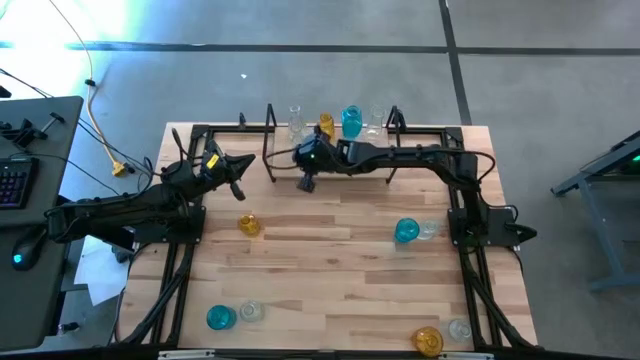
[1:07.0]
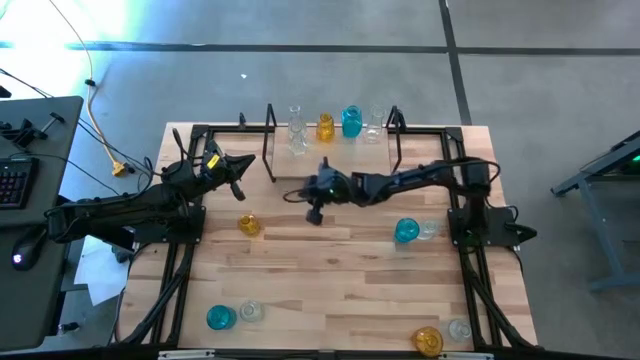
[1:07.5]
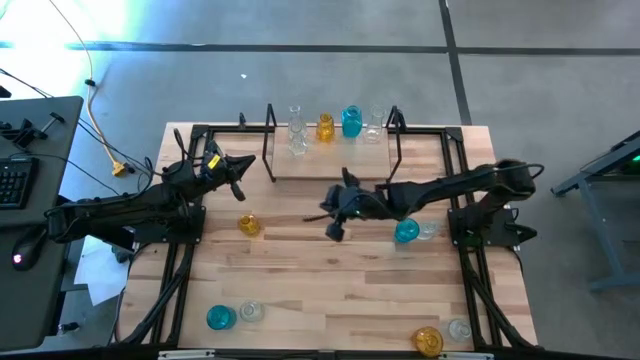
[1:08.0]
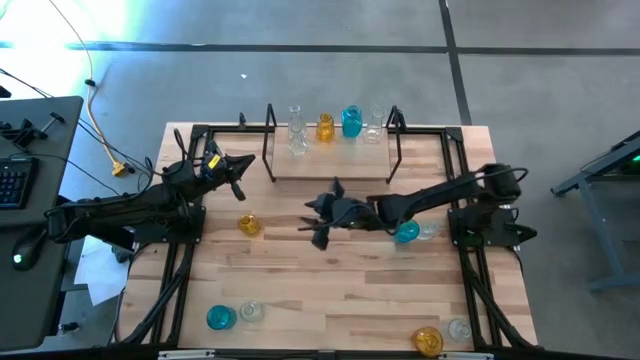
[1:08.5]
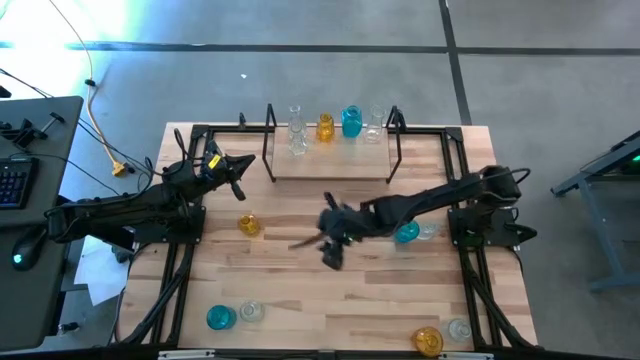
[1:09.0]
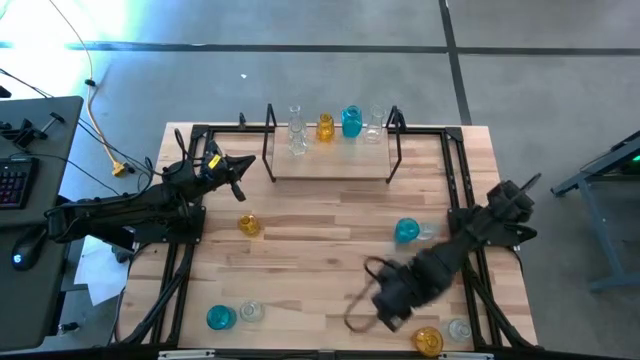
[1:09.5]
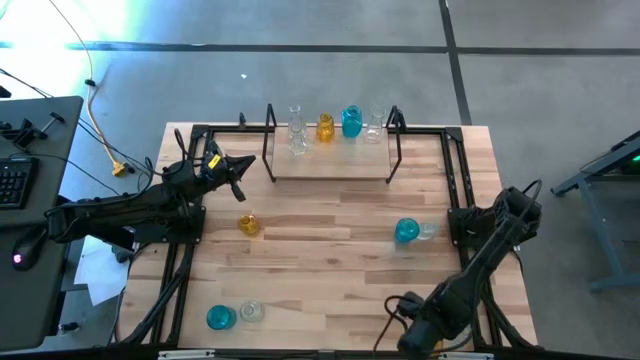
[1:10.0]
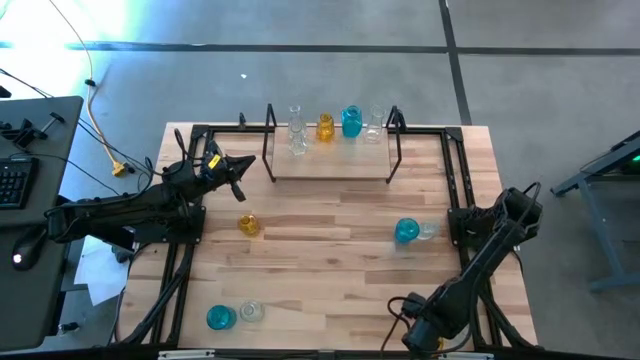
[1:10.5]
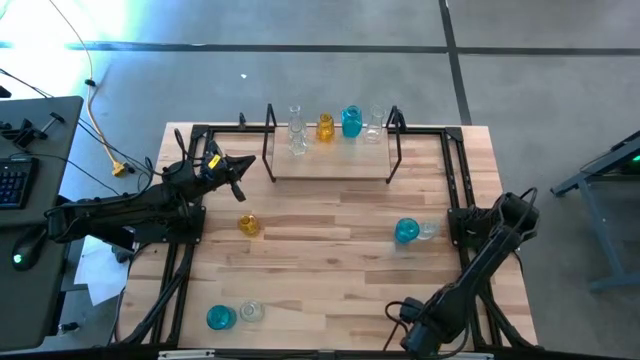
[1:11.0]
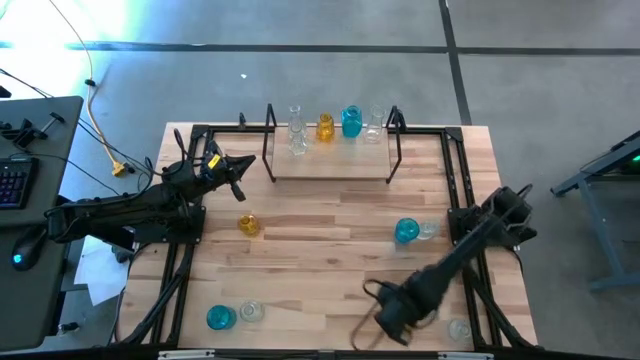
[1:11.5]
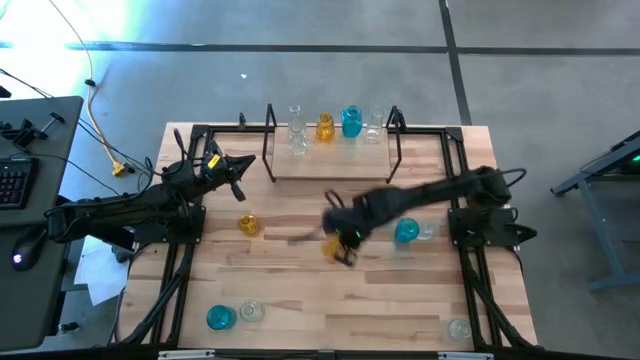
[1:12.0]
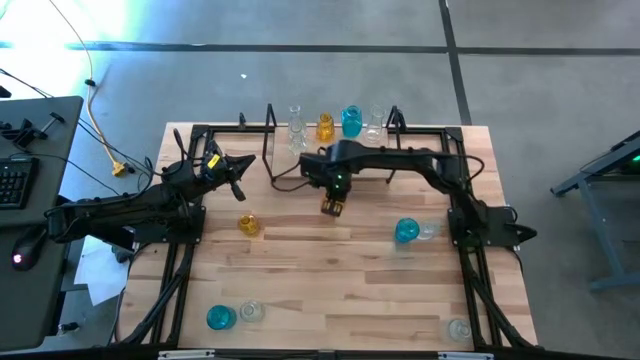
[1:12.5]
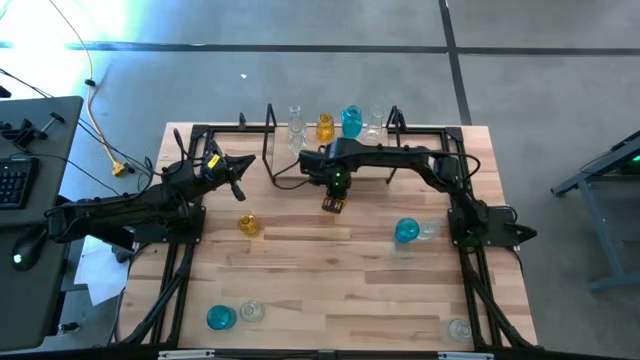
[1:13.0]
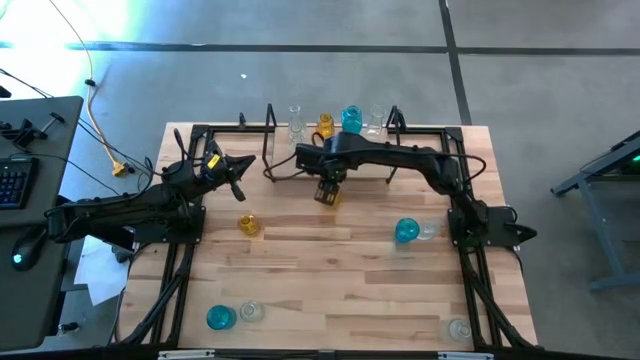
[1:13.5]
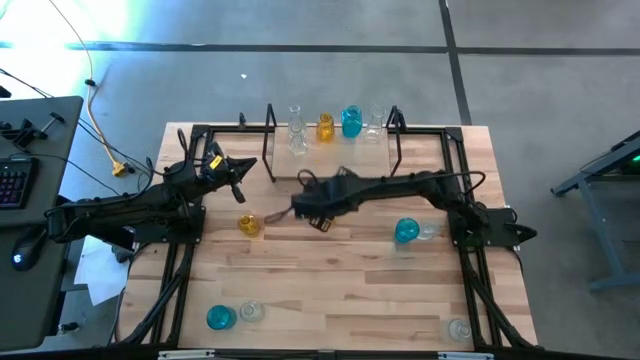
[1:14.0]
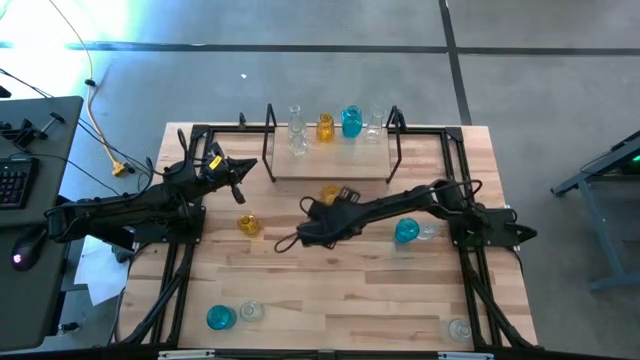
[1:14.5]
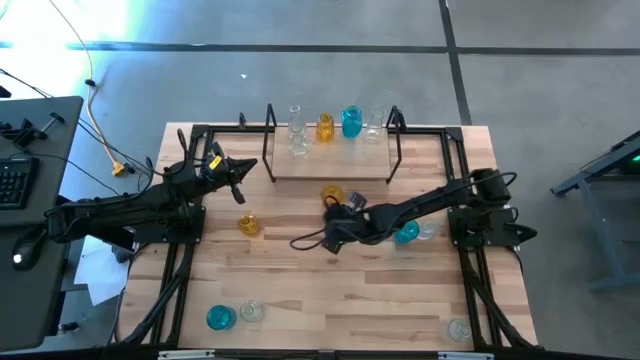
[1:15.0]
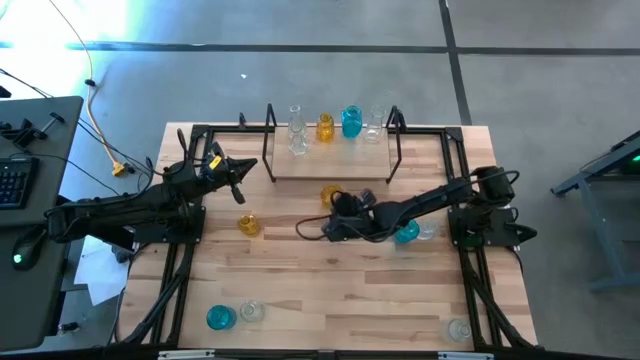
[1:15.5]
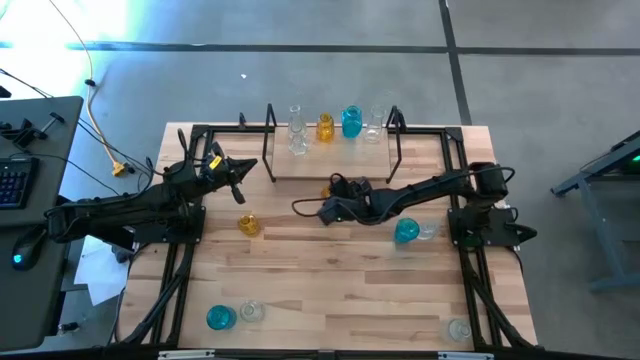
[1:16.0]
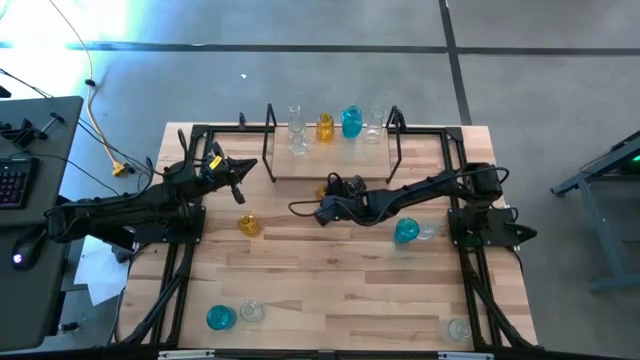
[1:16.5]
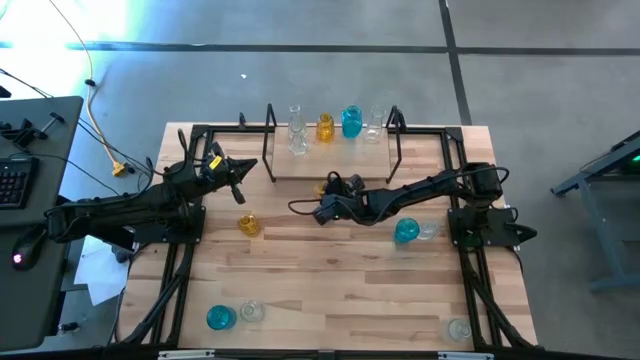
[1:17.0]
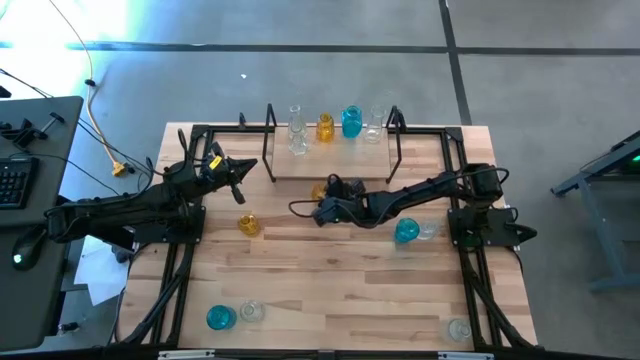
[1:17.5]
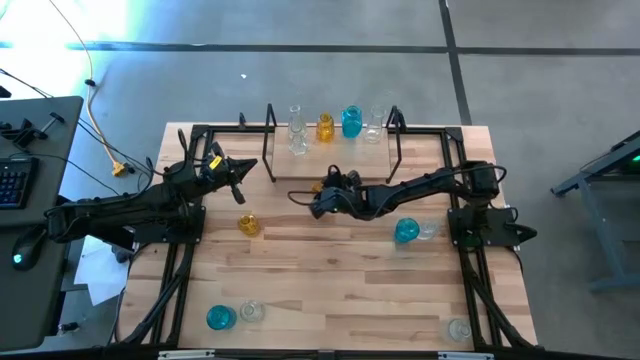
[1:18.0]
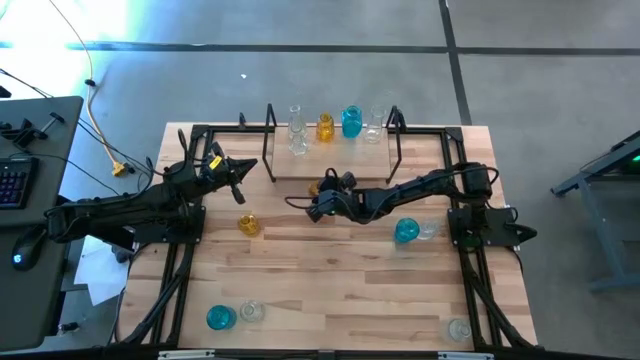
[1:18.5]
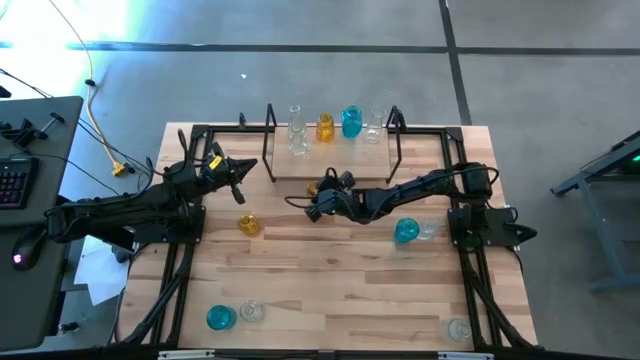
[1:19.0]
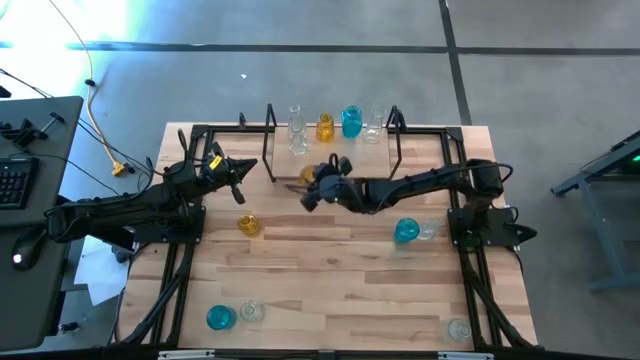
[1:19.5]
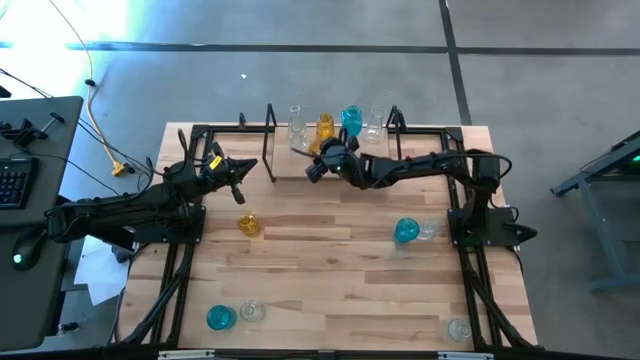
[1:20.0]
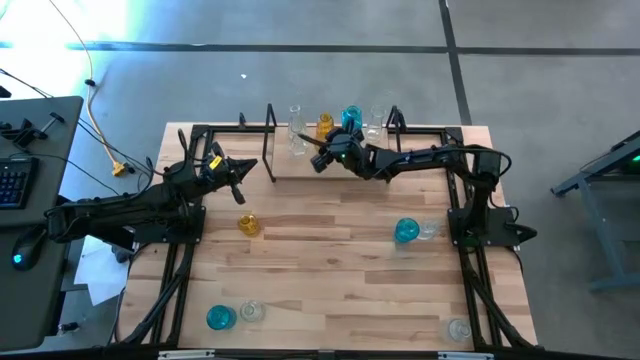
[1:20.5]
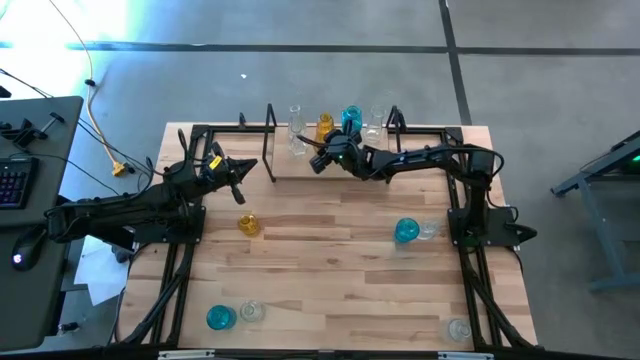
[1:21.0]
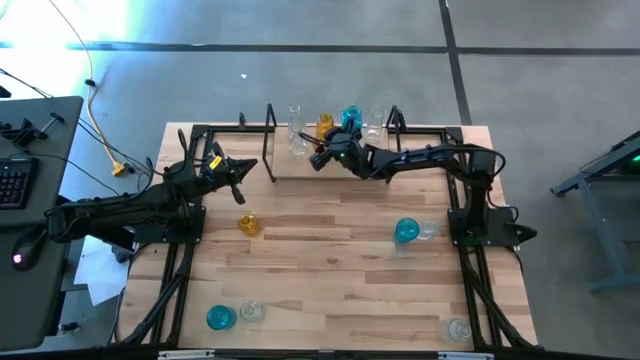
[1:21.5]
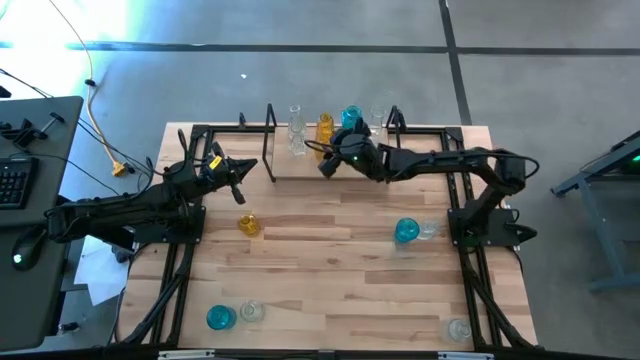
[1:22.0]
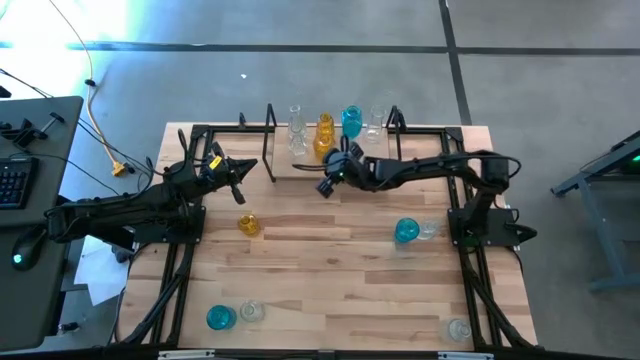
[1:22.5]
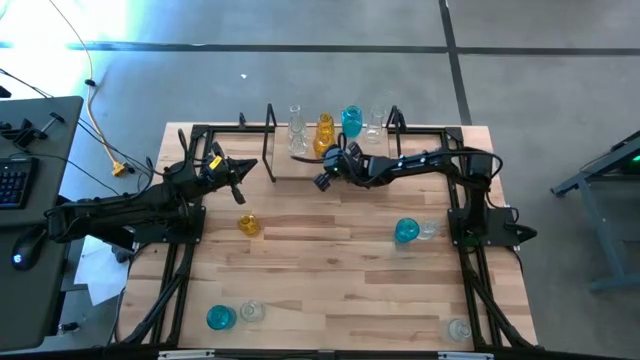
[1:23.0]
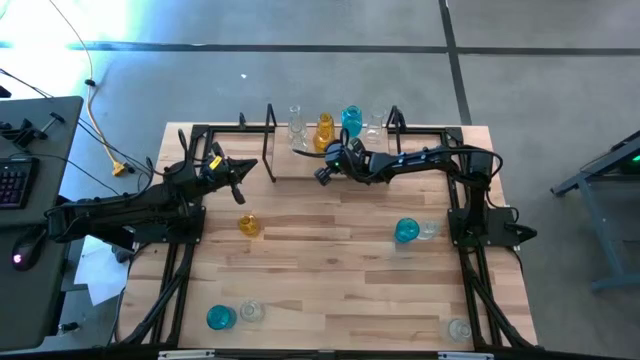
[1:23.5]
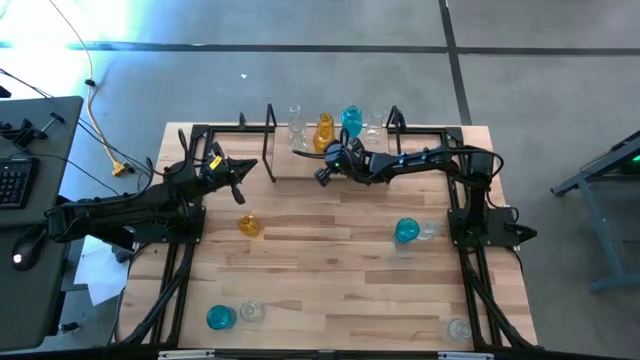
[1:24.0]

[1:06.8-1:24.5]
Task: sort vases onto shelf
Put the yellow vase on the shelf aligned with the other yellow vase

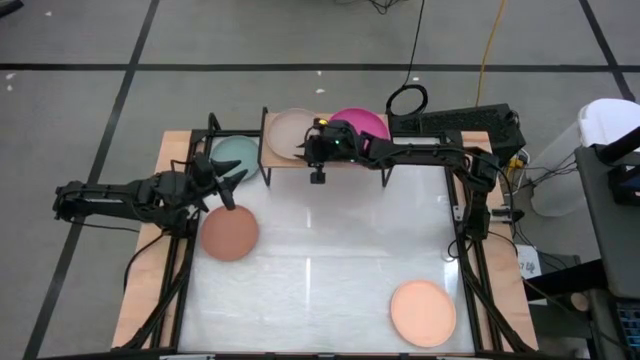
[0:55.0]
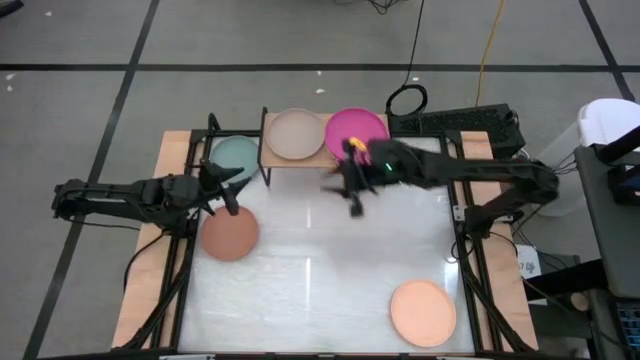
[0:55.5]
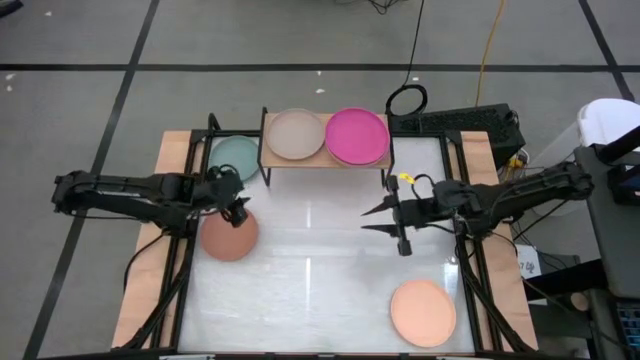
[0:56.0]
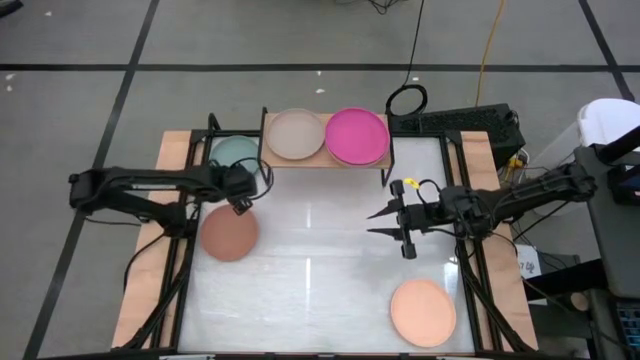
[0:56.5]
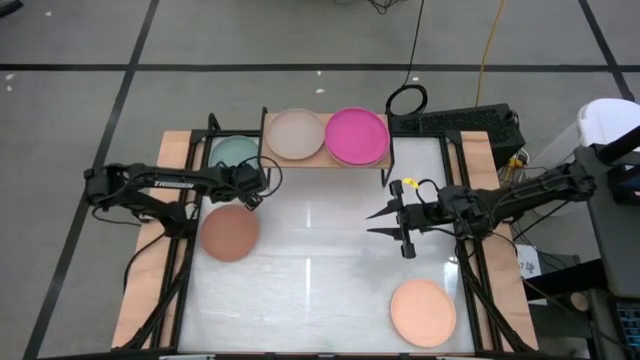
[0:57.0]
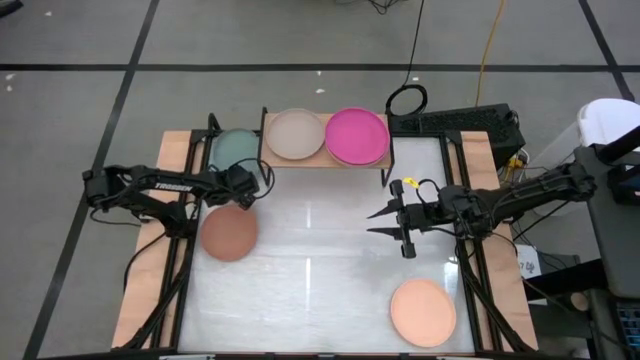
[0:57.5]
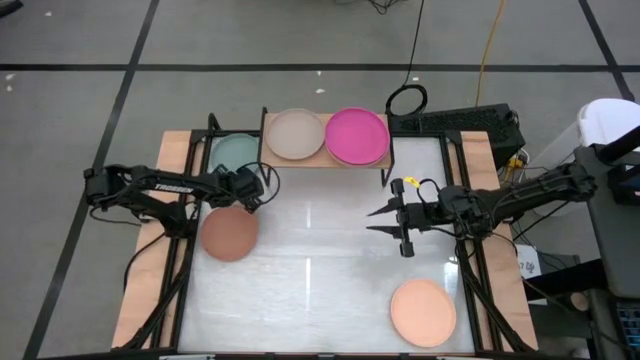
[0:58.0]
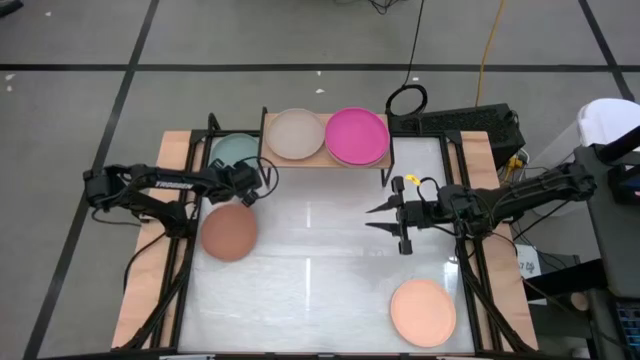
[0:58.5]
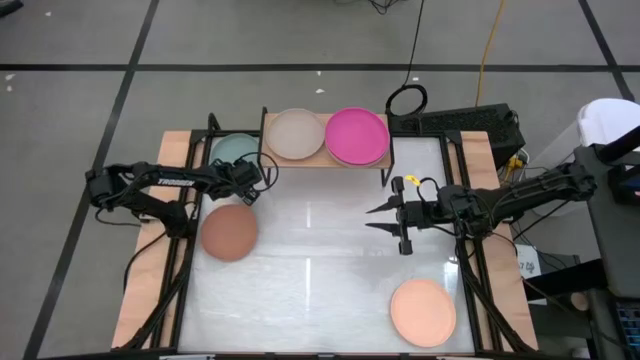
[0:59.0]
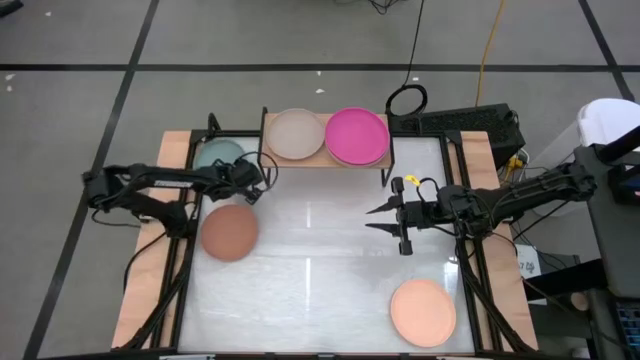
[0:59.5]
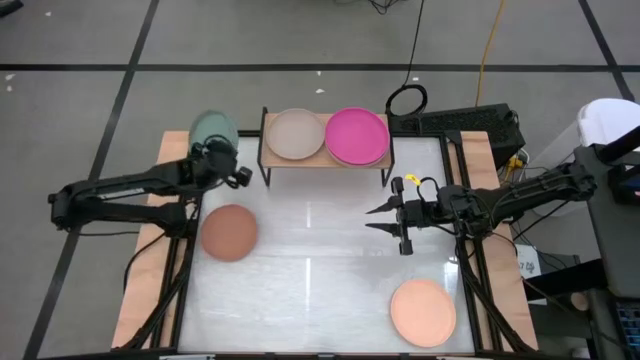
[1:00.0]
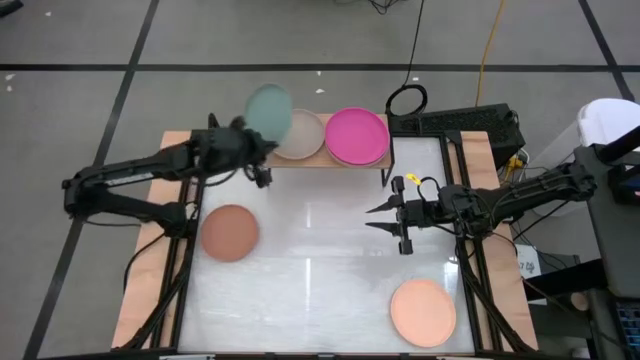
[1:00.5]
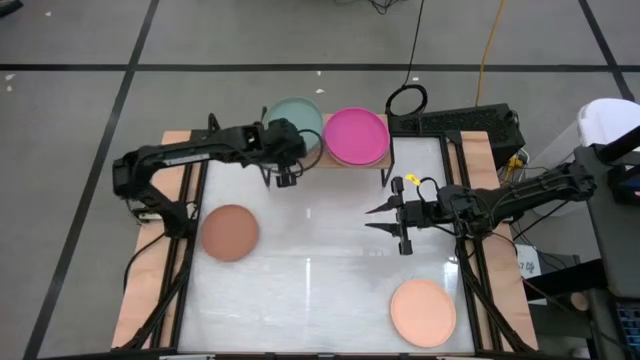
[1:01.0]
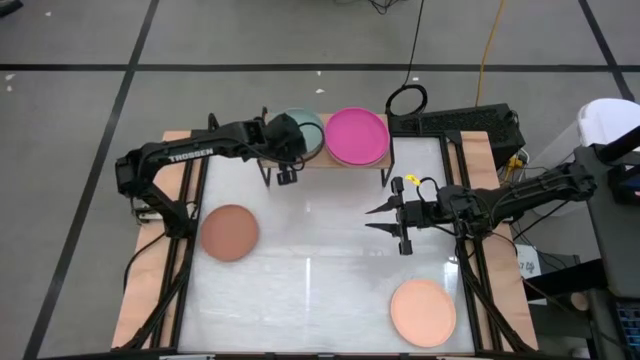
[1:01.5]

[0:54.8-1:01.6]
Task: Place and stack plates onto a shelf
Stack the light green plate on top of the gray plate on the shelf
